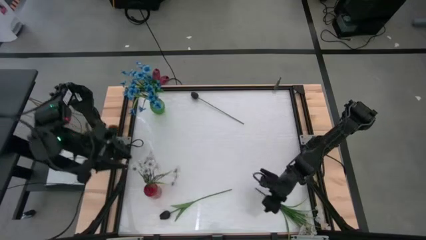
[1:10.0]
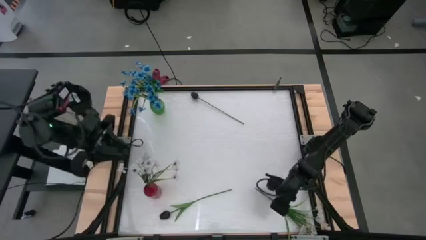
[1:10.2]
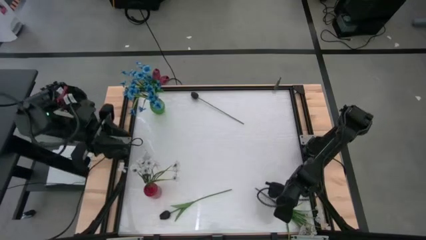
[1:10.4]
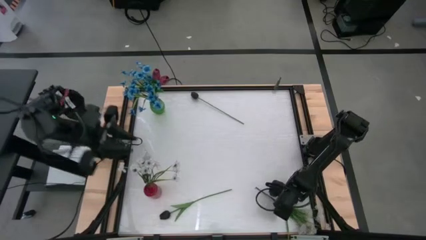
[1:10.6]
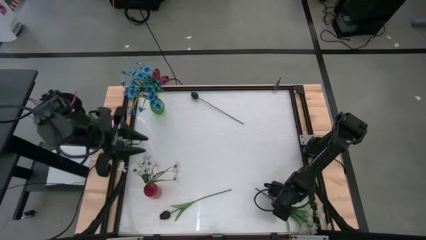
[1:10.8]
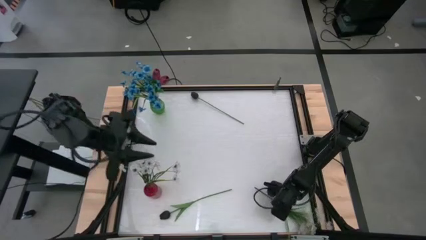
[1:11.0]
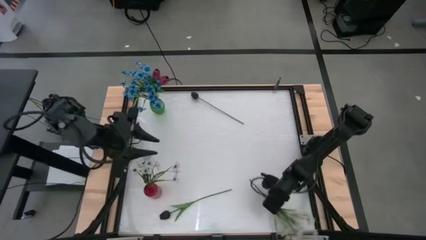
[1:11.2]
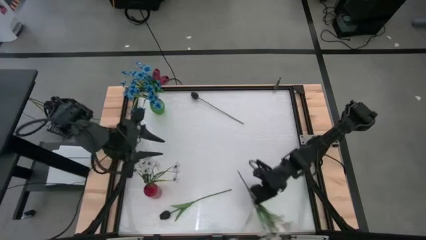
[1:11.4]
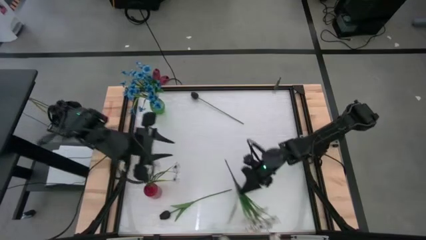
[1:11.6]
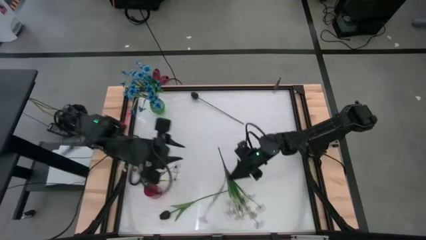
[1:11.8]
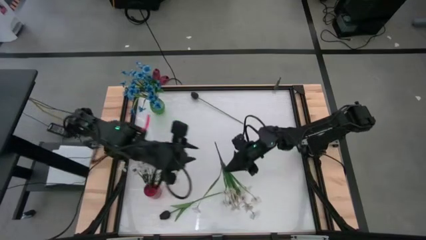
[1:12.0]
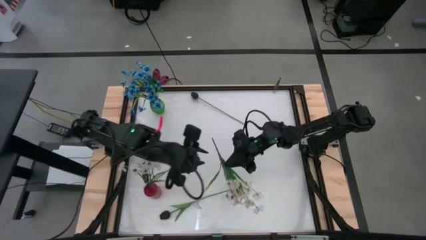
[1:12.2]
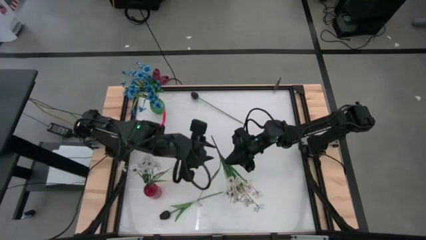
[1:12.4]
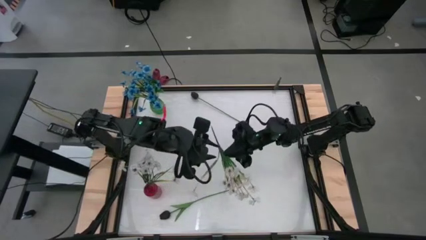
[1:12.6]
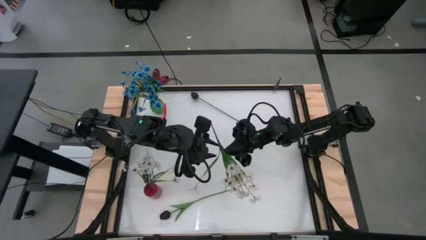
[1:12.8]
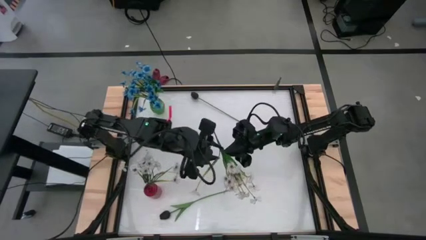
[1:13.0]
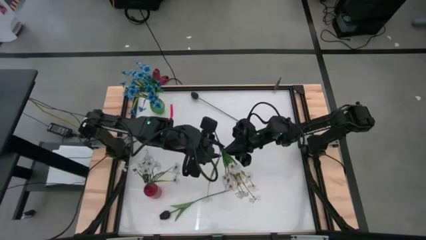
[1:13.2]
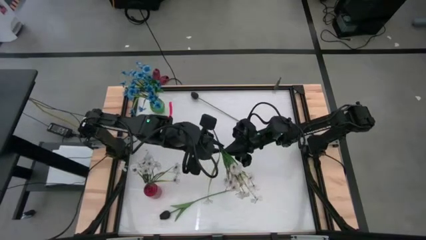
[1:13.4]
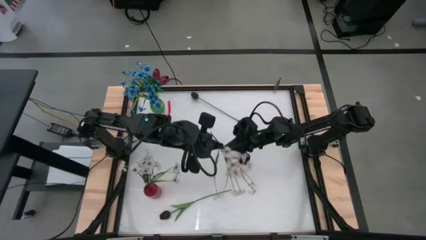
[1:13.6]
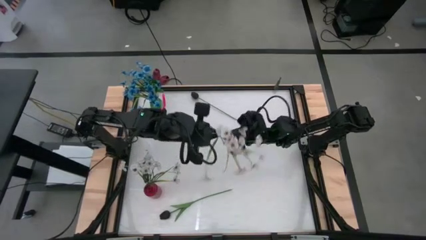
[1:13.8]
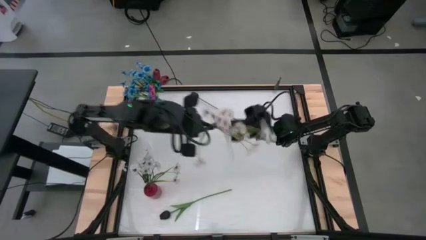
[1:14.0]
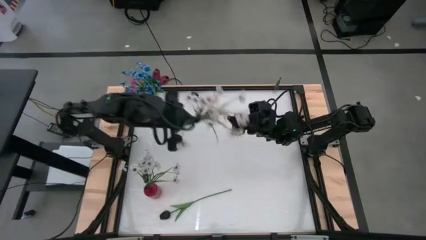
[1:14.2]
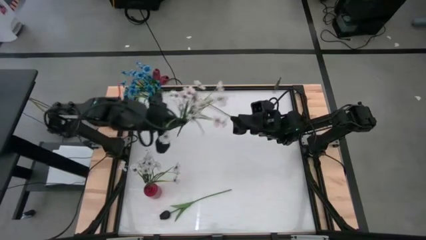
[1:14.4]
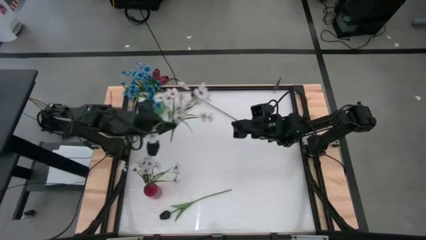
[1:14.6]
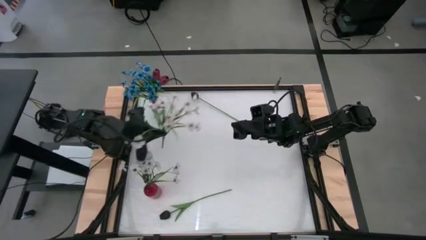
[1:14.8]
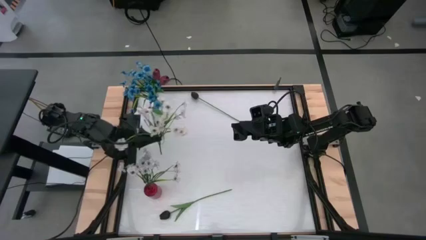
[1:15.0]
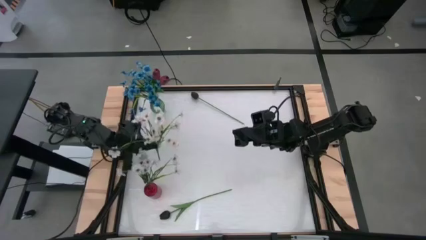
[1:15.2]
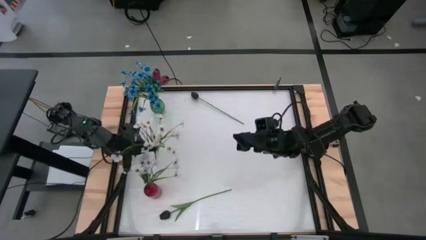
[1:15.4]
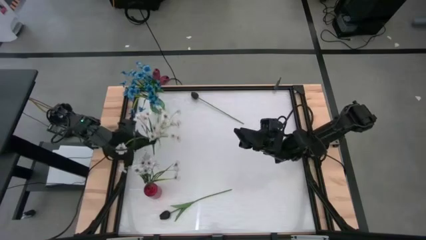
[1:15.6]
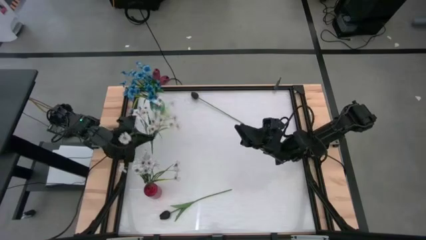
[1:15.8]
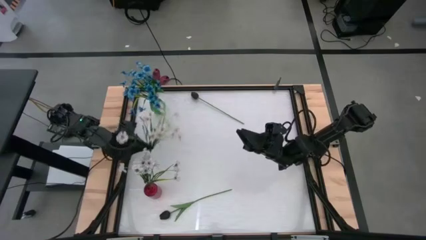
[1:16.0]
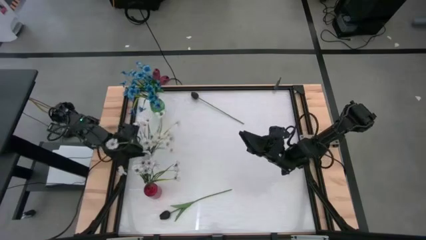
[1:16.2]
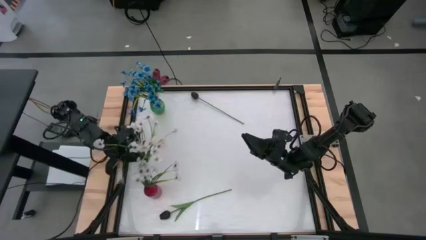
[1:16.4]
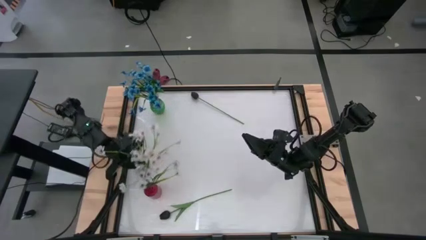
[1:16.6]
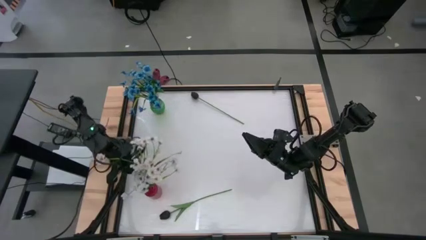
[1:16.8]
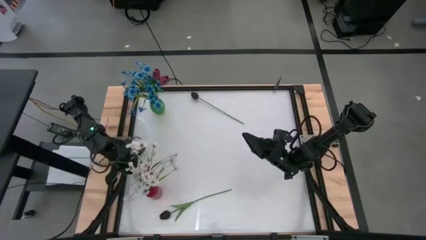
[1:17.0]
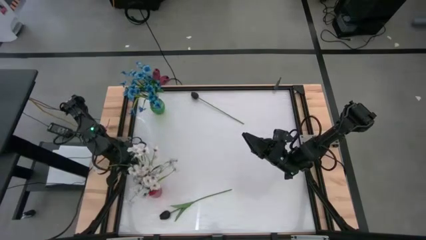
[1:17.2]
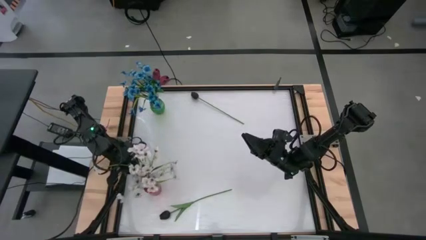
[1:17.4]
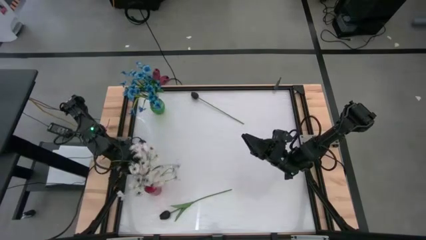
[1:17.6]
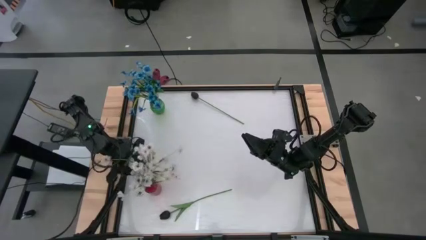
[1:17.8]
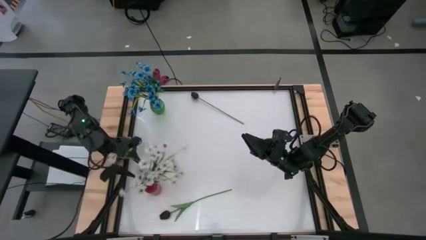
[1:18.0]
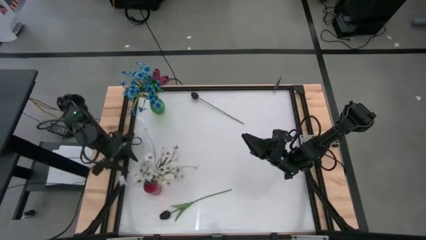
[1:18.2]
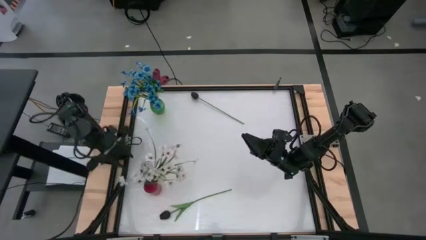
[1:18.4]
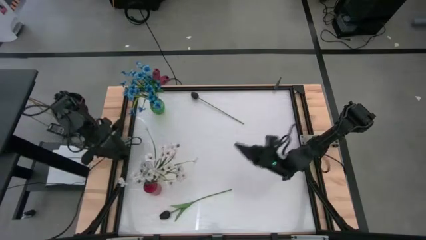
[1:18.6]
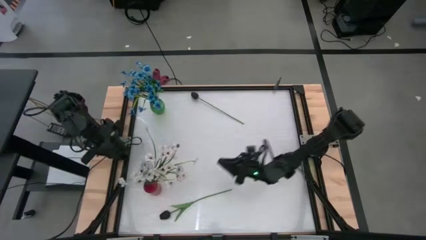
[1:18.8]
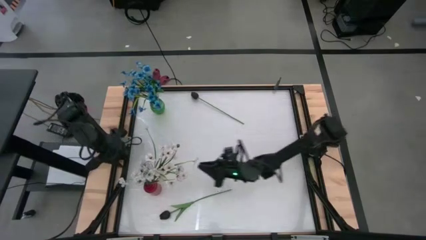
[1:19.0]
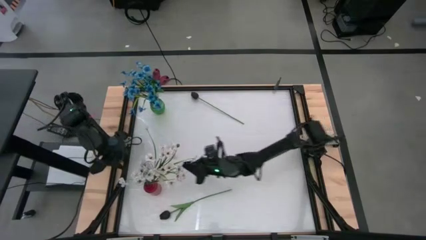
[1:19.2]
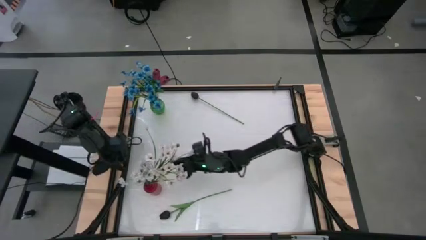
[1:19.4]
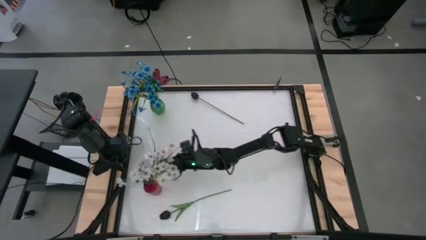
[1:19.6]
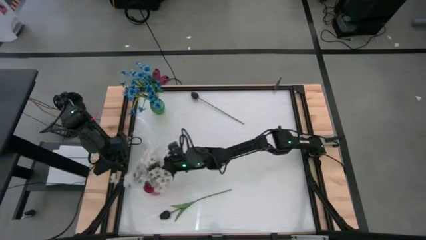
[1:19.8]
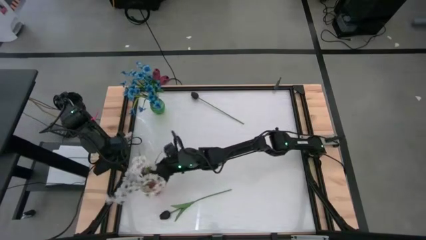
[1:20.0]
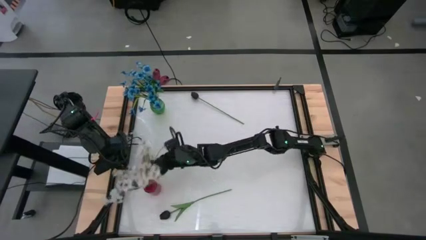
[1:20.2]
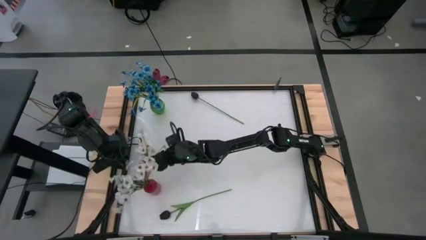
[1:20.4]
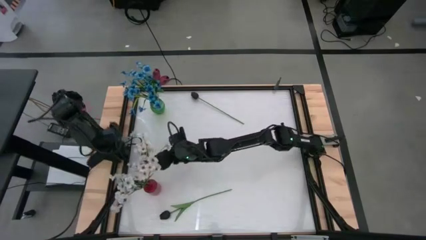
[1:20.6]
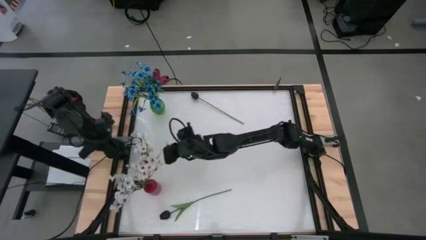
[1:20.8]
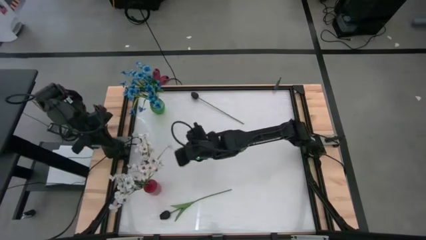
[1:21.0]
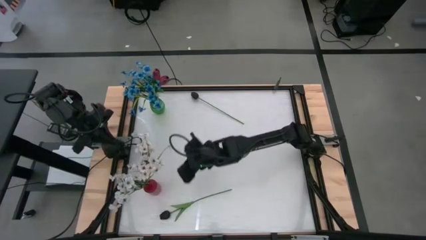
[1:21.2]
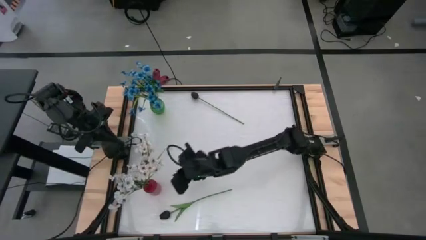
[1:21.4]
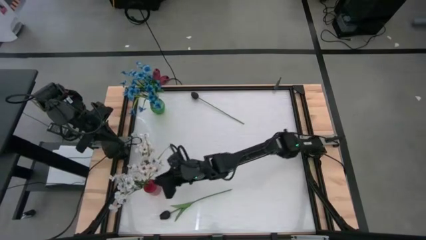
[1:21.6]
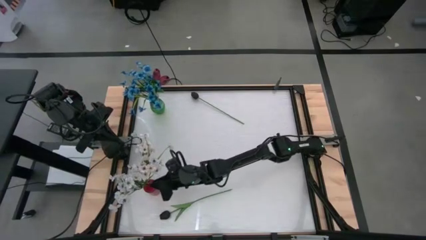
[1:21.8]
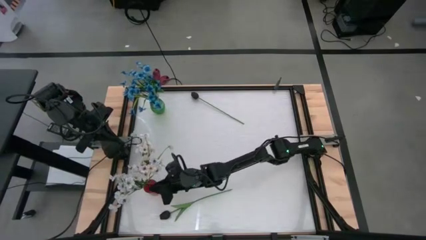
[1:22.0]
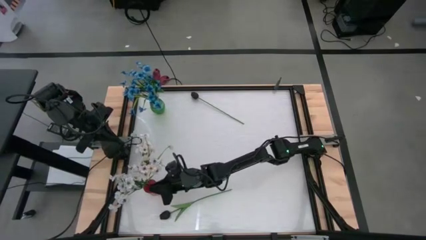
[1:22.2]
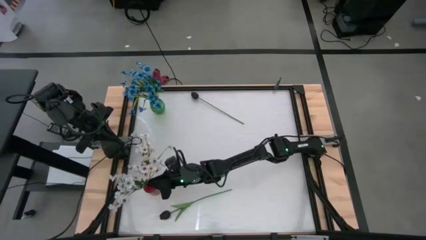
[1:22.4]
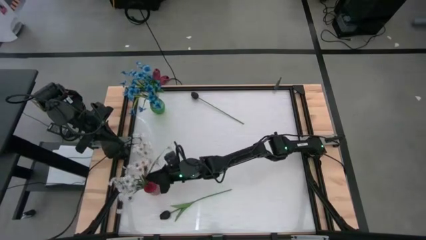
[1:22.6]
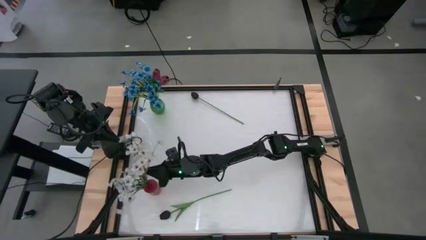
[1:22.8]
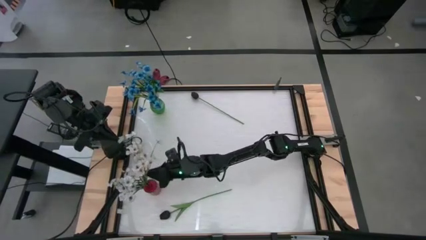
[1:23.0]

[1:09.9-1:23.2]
Task: Sort flowers into vase by color
Put the white flowers into the red vase

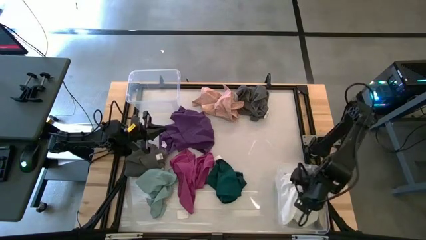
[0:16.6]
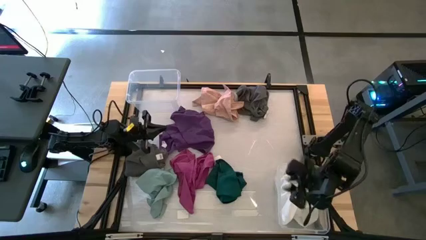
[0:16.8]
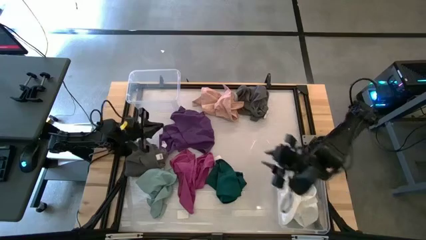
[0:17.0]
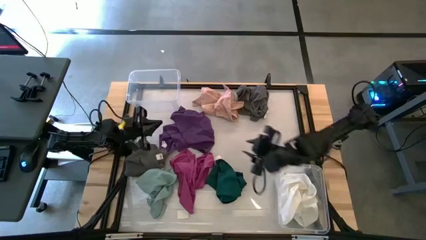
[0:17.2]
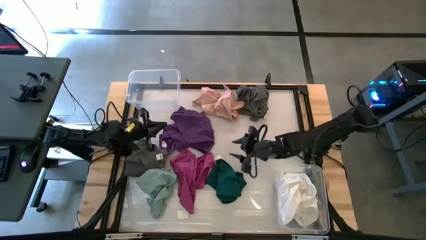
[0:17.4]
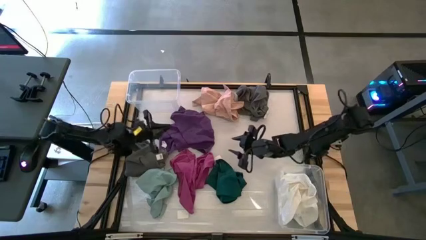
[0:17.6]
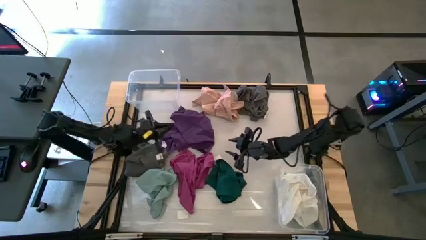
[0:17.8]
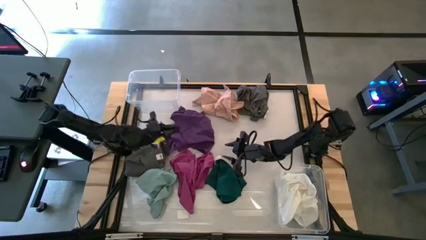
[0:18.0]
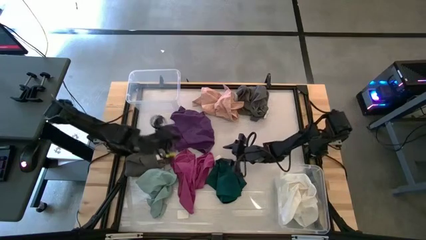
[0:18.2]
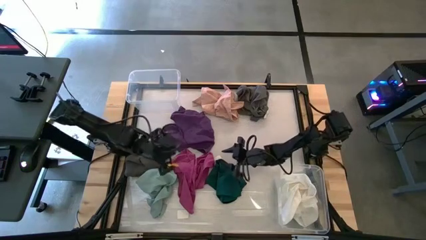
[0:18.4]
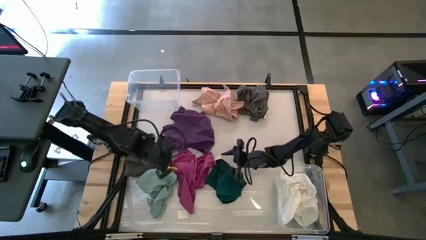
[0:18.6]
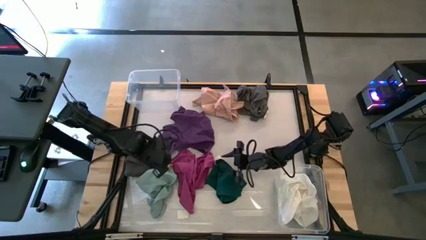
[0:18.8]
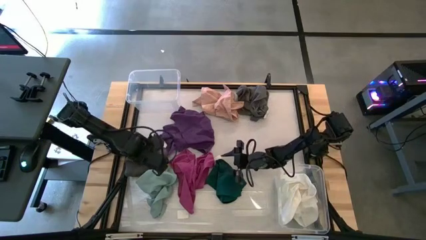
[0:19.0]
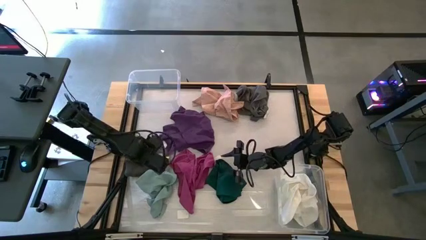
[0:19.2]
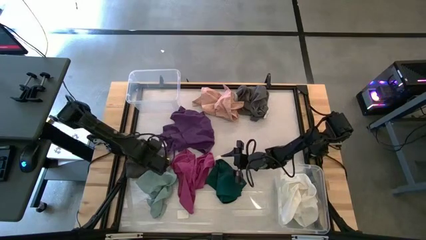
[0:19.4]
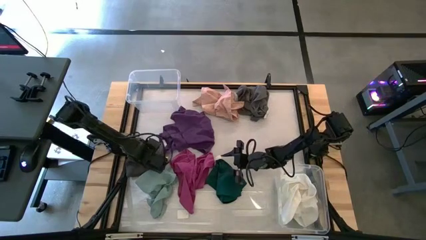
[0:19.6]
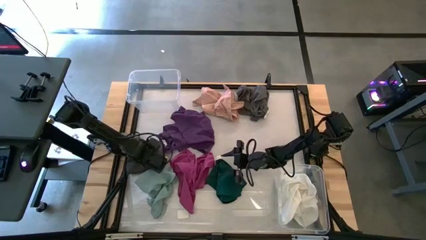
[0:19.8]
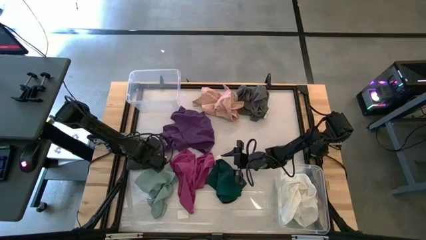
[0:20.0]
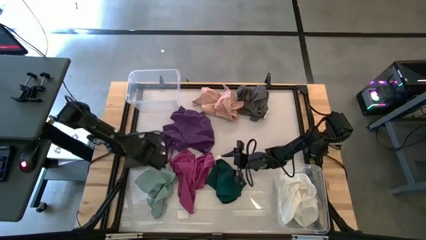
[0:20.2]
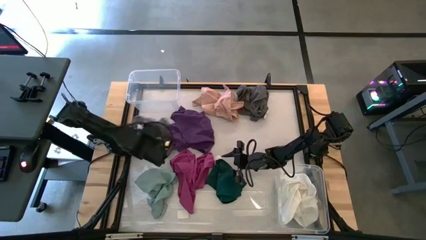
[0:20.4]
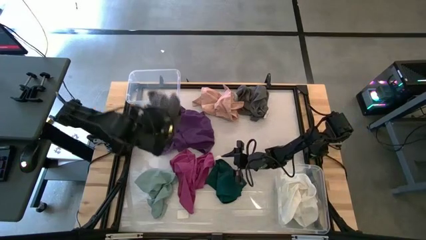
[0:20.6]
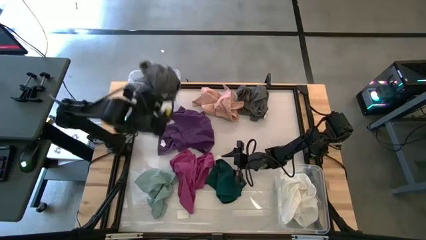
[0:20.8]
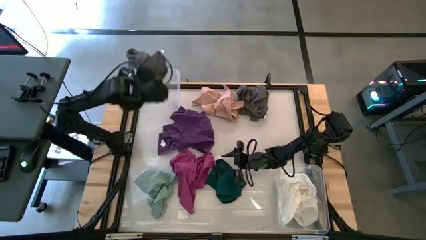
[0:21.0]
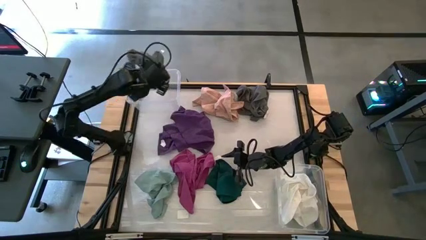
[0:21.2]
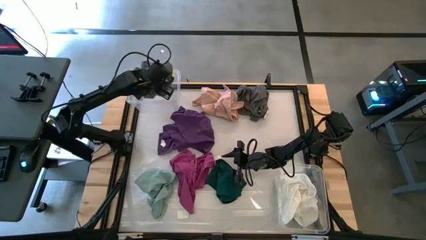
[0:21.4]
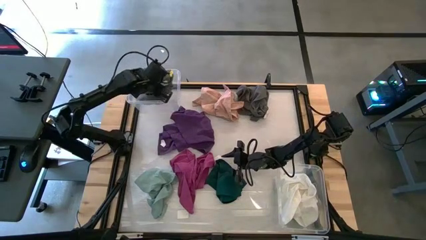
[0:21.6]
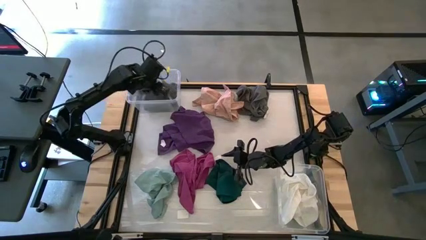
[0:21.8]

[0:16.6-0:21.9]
Task: Sort microfiber towel by color & place in baskets
Put the bottom gray towel into the top transparent bin
